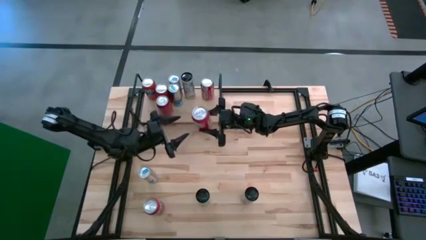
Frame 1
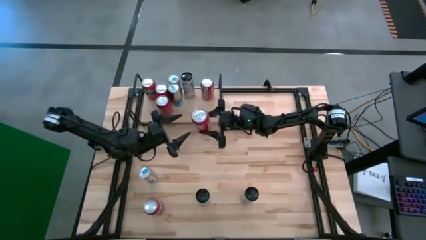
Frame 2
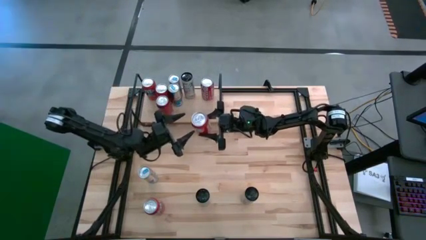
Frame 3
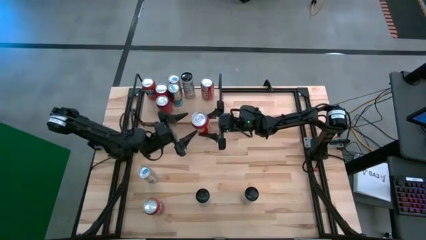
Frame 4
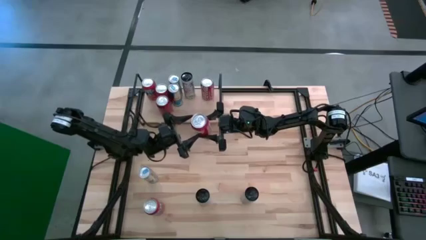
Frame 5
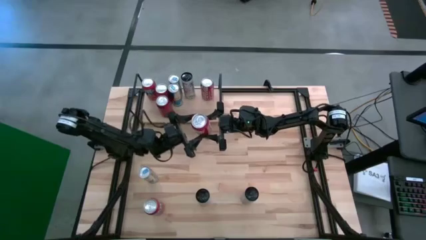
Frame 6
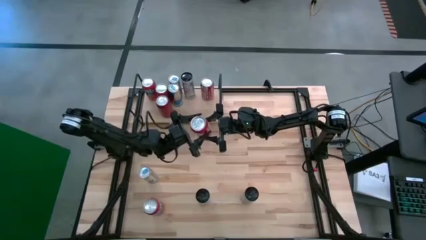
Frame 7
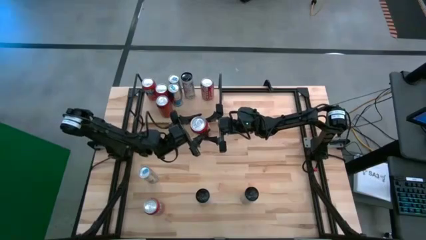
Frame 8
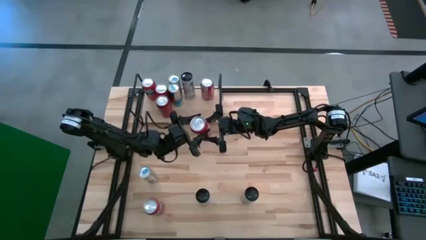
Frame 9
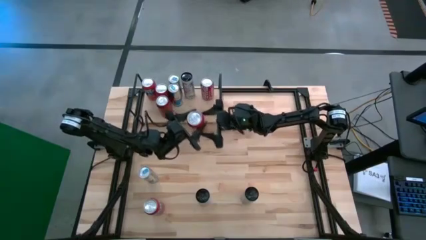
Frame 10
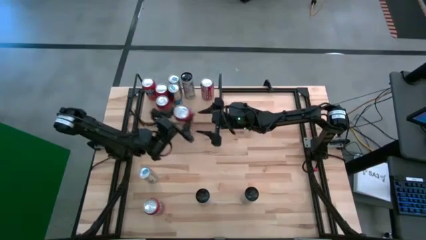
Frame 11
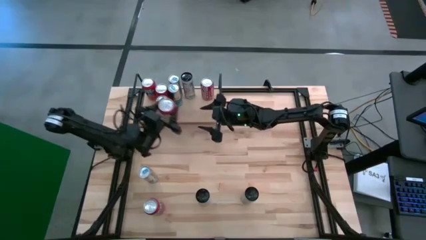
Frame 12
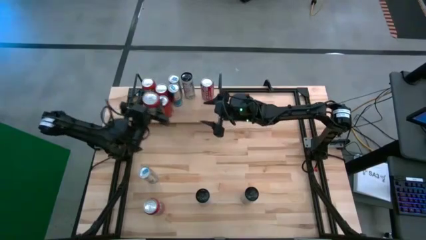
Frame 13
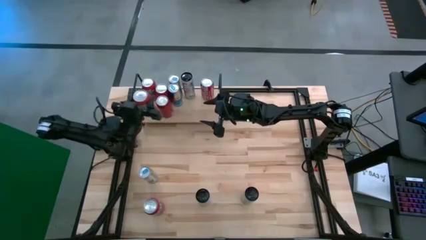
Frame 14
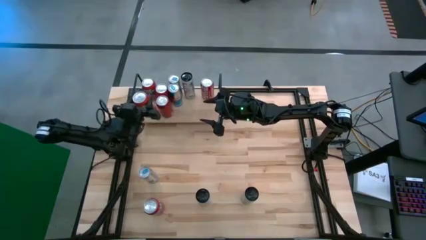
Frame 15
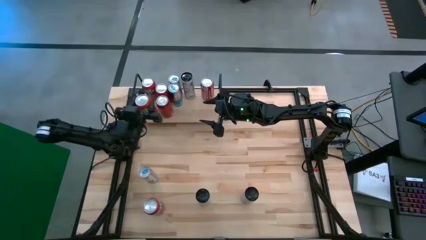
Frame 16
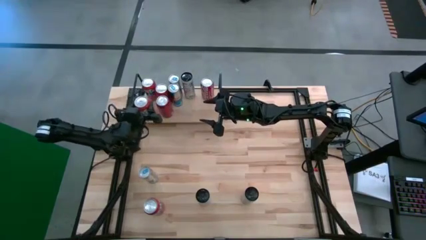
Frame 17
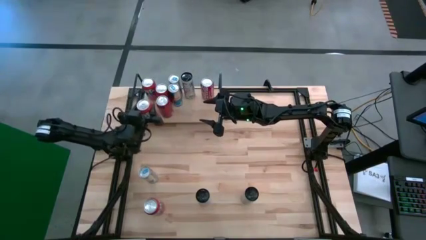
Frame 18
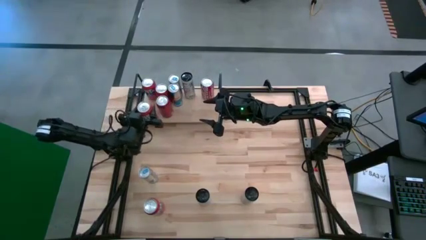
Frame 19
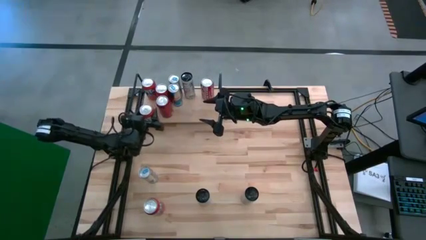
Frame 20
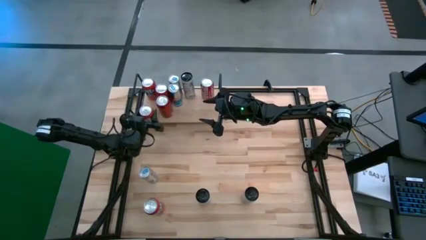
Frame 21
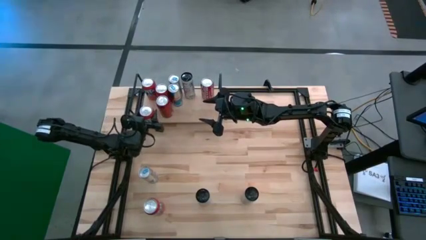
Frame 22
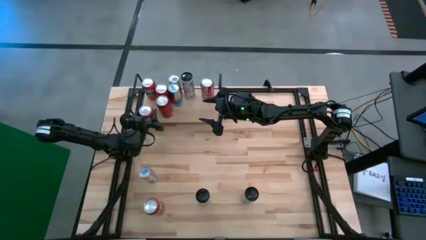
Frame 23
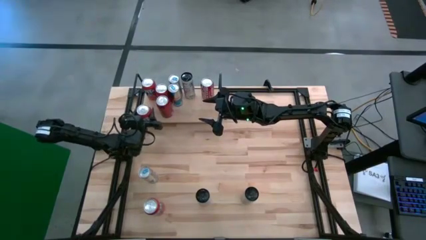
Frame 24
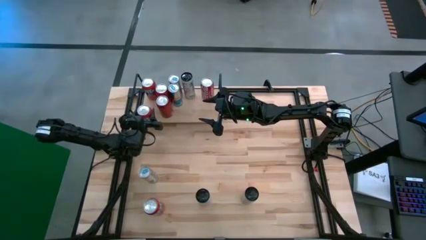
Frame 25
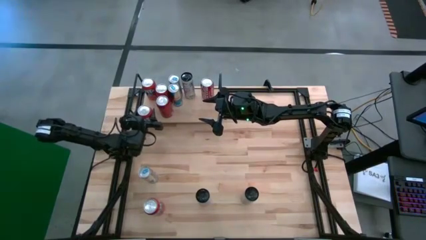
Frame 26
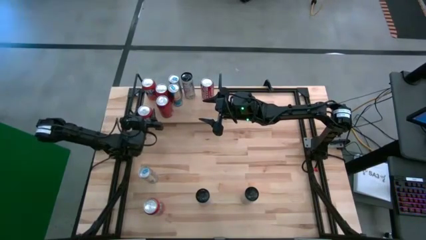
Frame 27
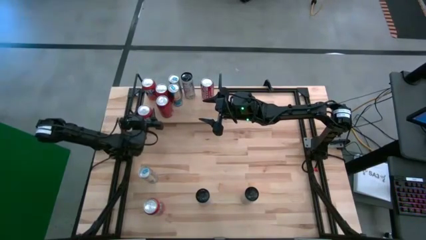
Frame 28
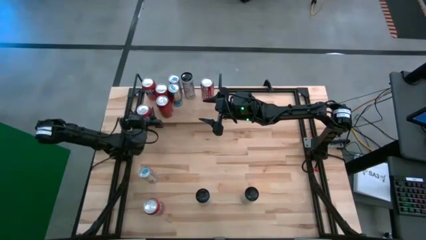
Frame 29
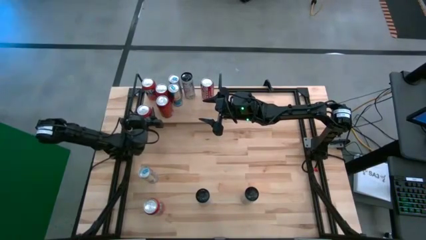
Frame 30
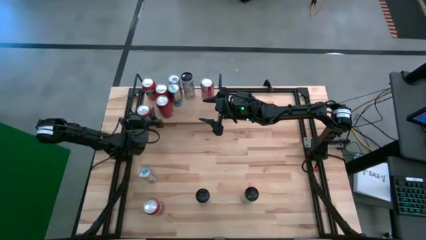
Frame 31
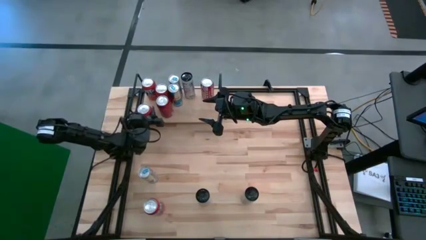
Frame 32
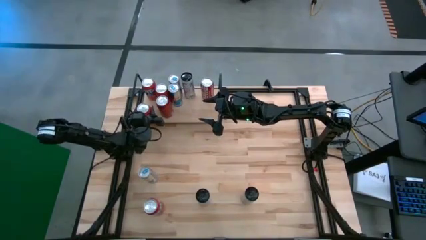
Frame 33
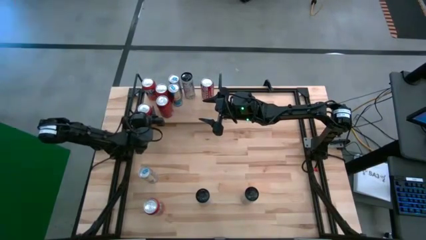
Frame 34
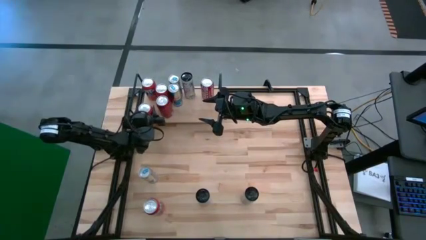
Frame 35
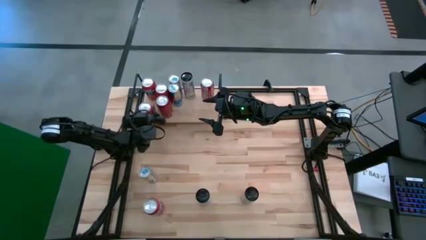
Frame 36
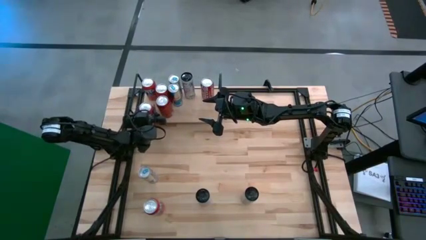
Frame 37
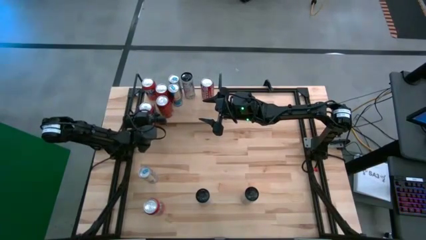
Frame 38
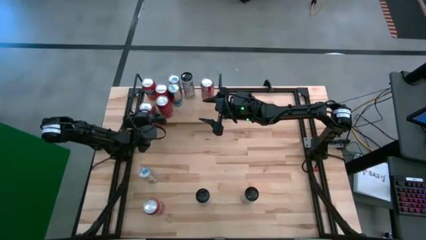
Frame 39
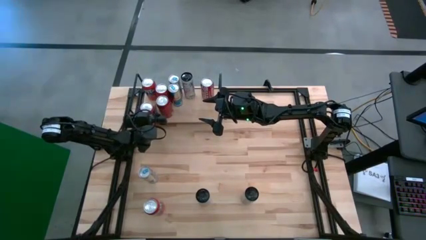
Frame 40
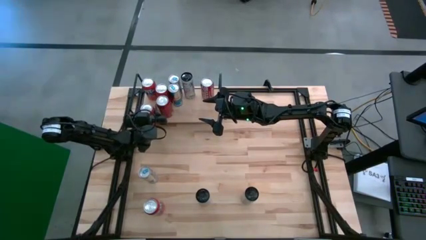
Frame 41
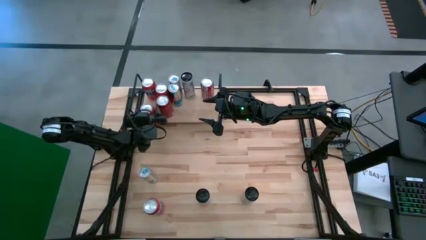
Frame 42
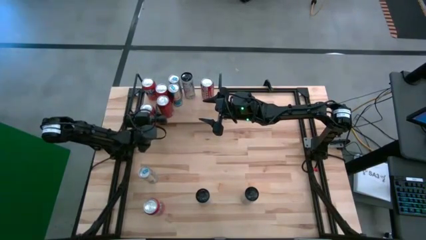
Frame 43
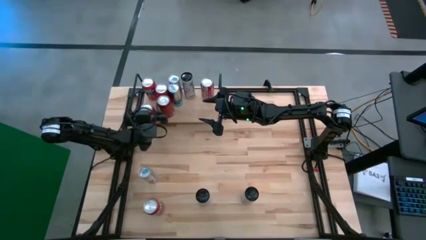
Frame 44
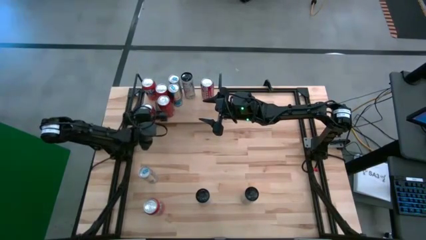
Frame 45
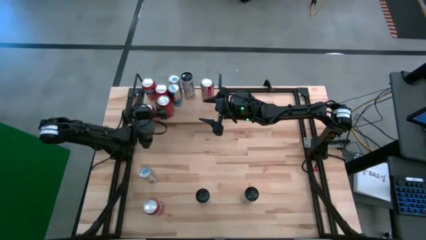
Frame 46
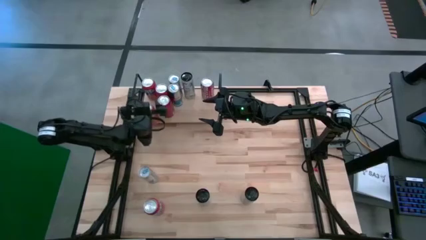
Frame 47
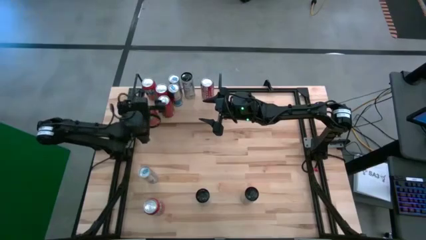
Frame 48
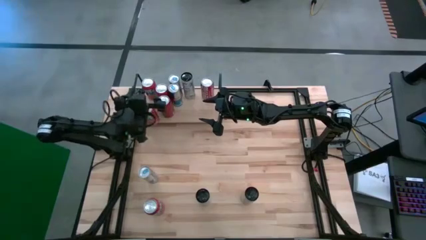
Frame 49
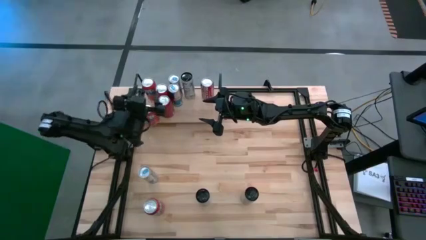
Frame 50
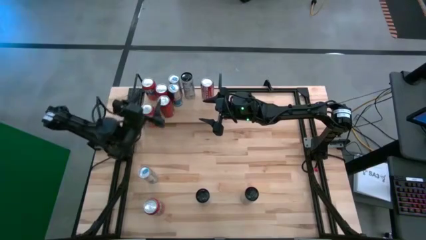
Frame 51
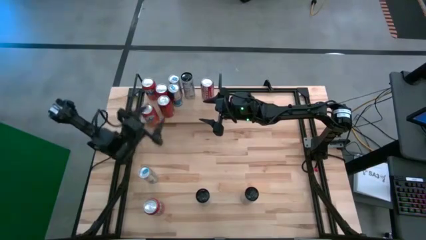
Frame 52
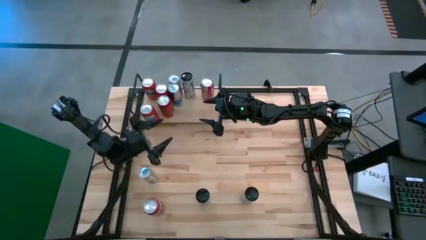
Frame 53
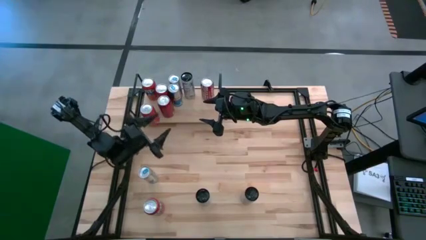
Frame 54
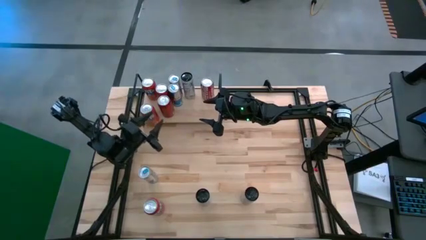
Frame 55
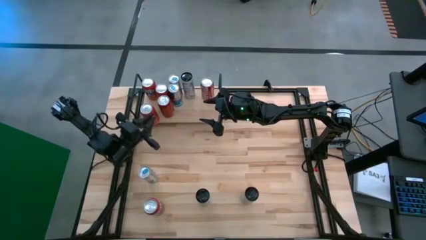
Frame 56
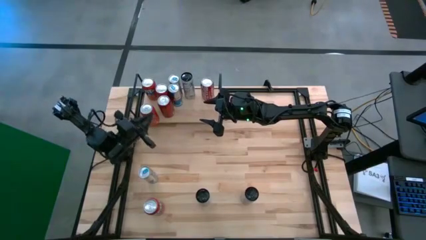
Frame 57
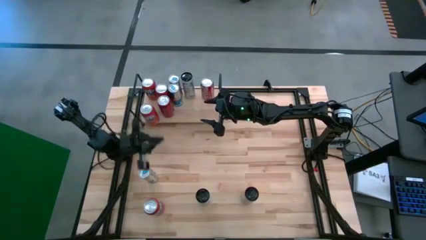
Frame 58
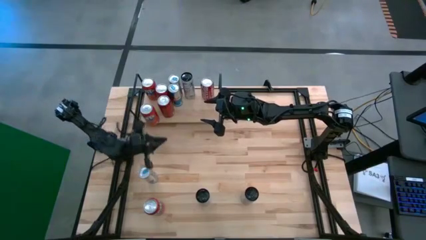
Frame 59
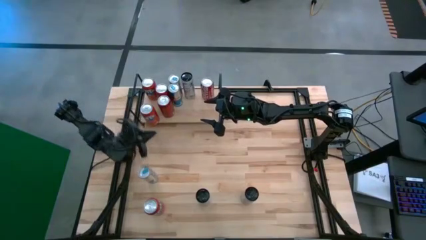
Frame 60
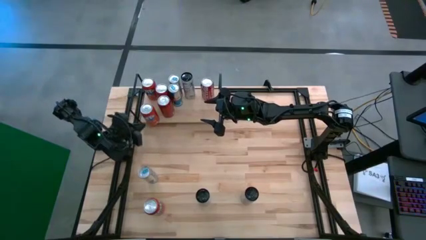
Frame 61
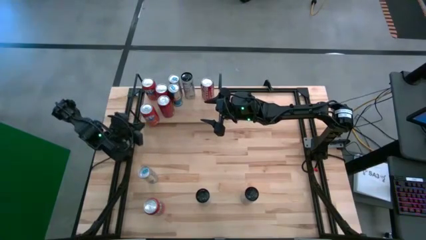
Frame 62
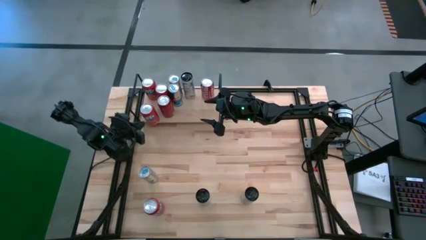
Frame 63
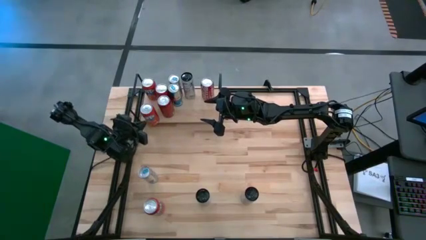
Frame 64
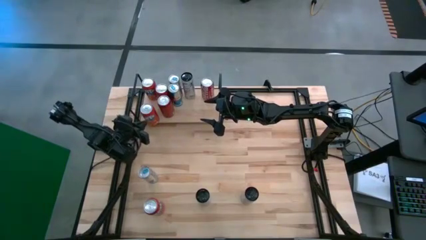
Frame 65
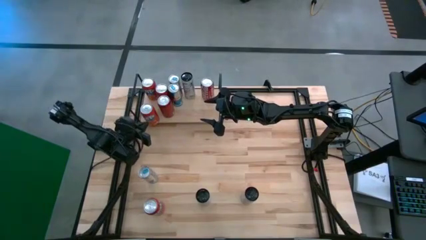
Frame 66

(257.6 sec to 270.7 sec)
Task: Place canned beverage on shelf
Put the top orange soda can on the shelf aligned with the other orange soda can
